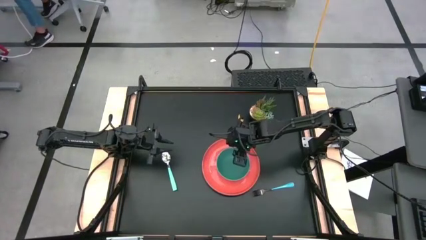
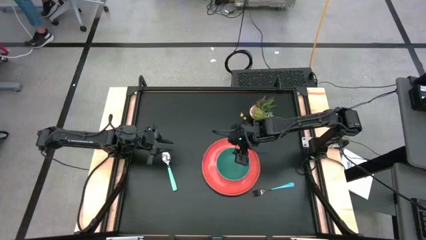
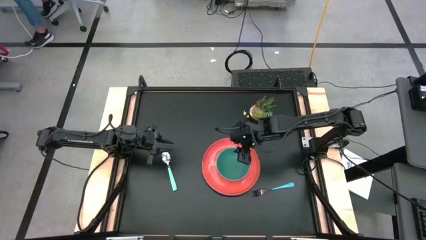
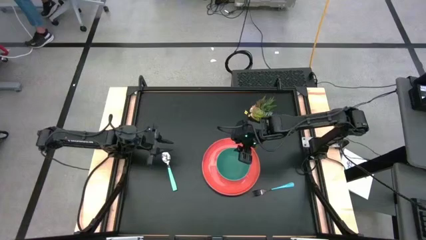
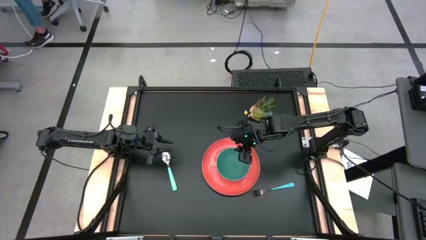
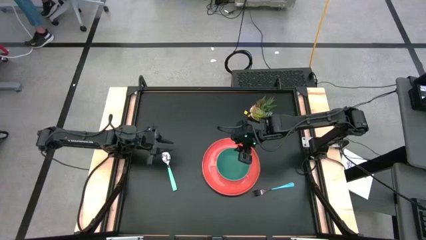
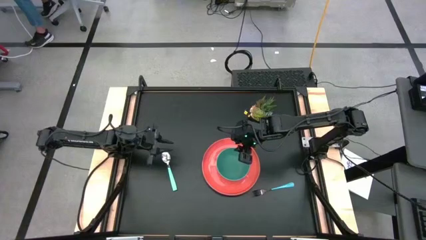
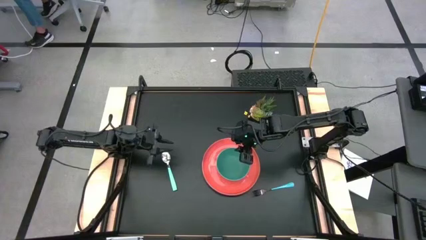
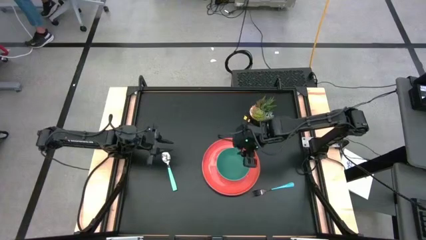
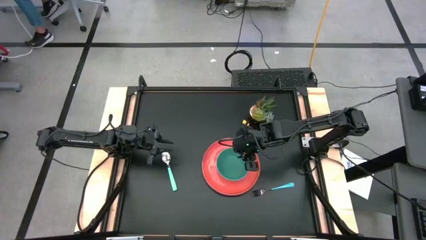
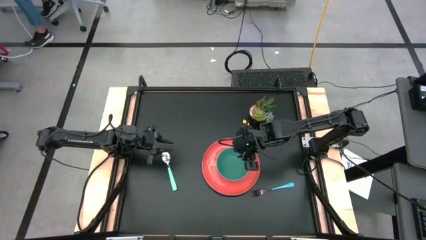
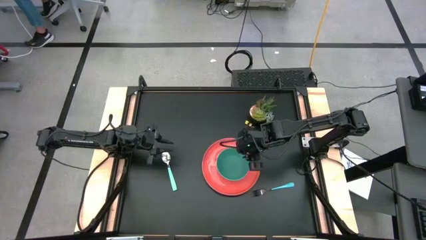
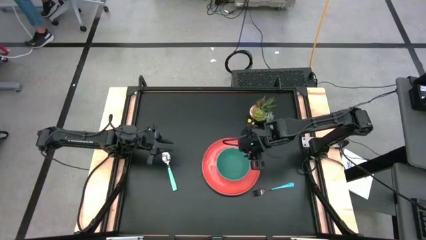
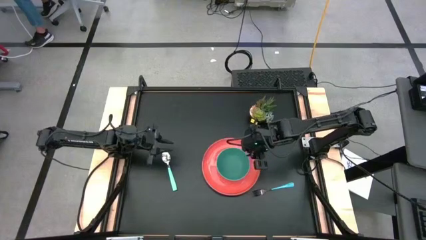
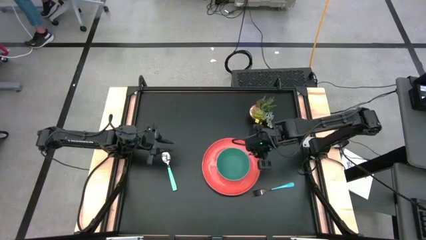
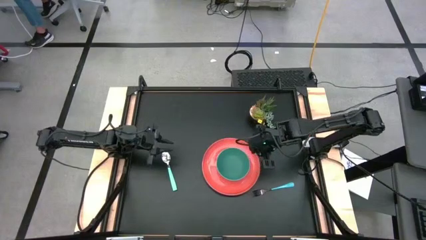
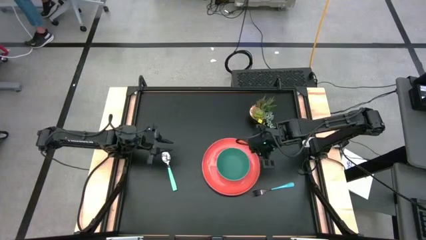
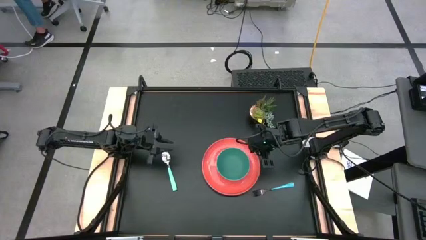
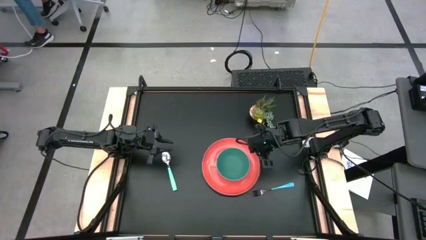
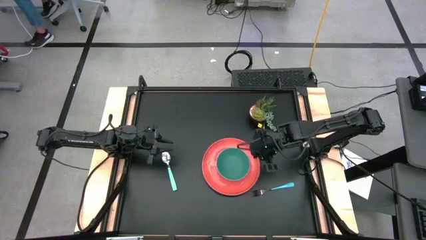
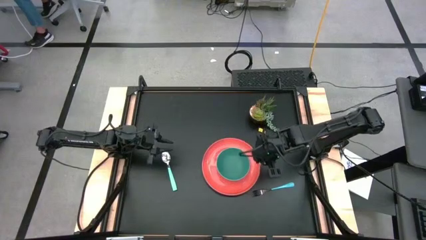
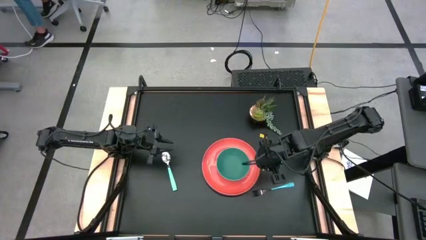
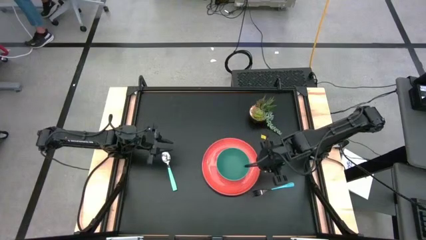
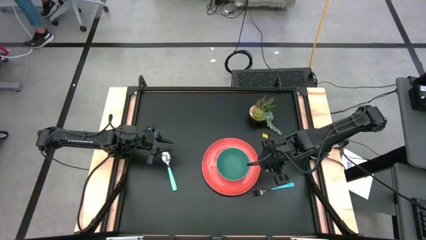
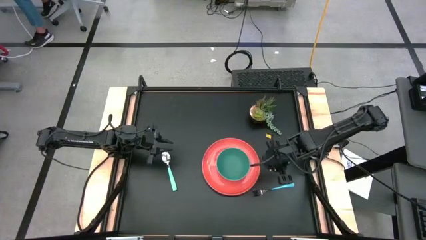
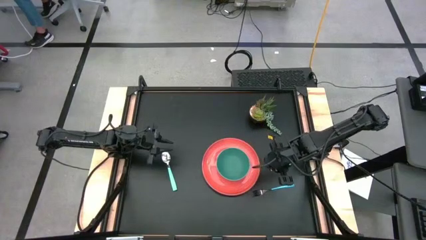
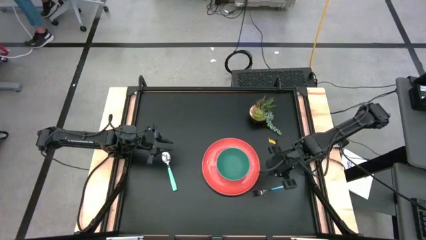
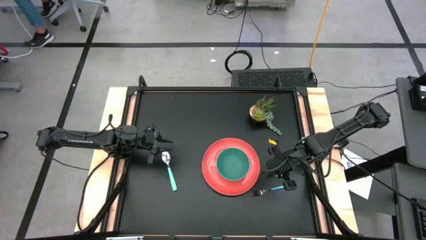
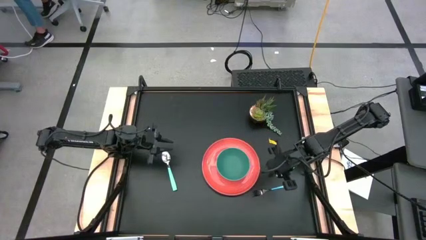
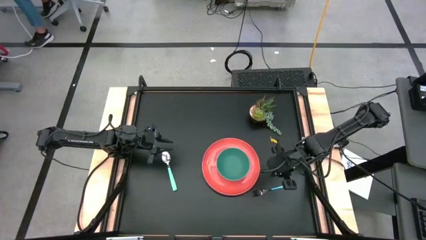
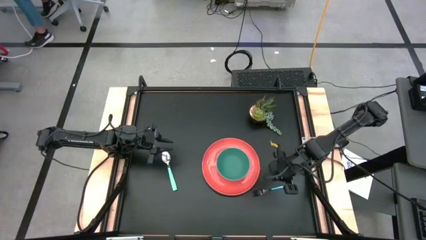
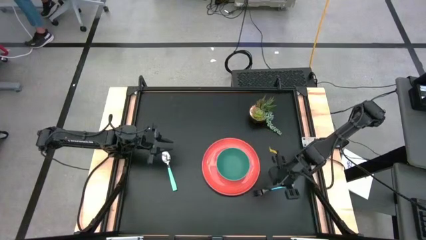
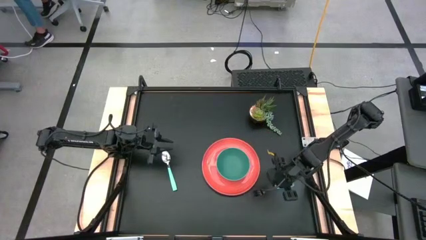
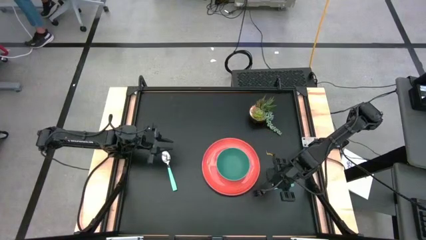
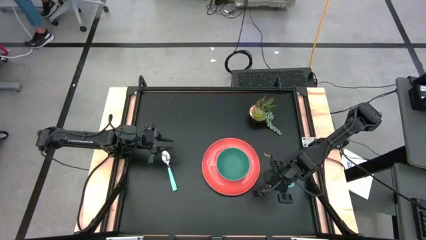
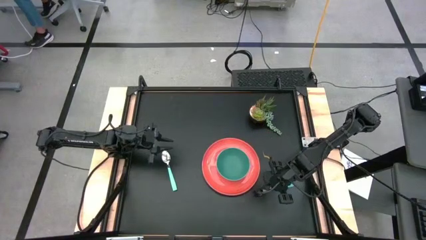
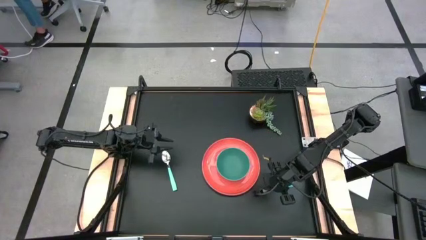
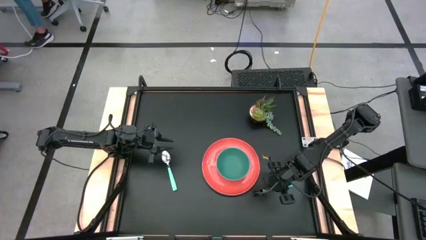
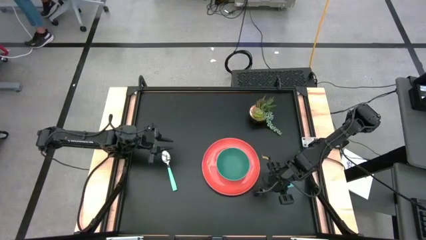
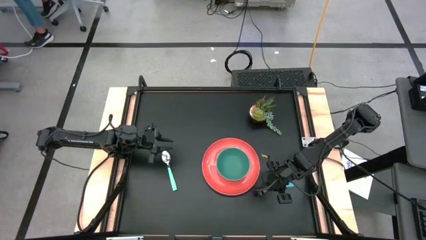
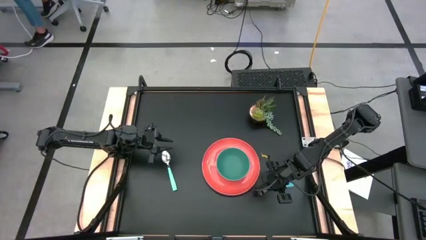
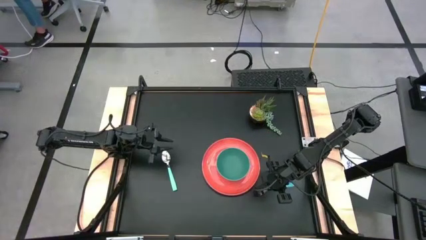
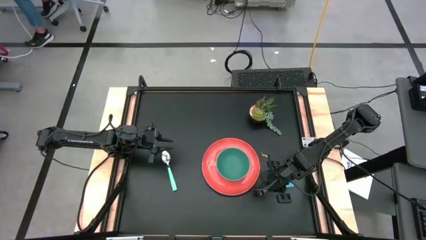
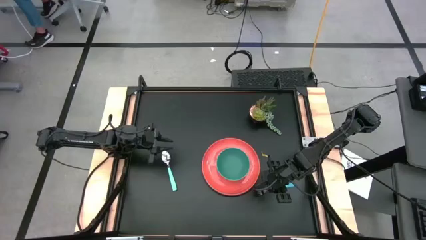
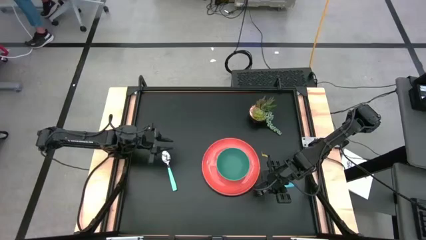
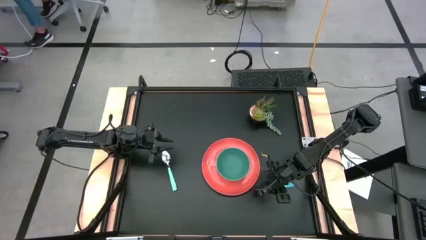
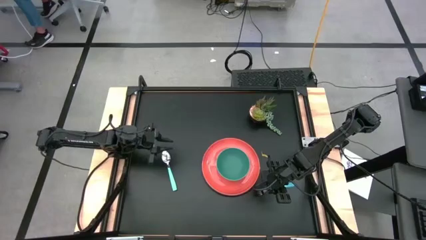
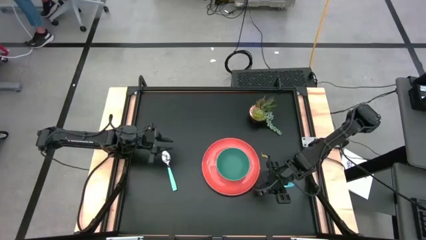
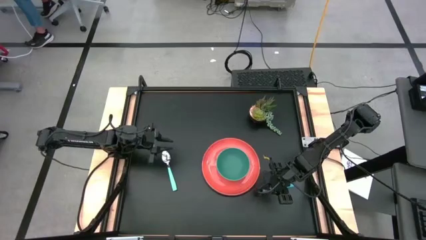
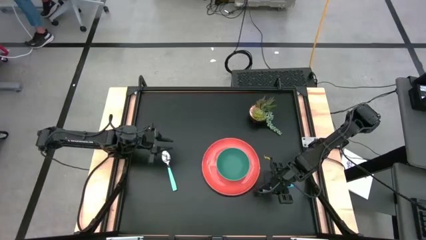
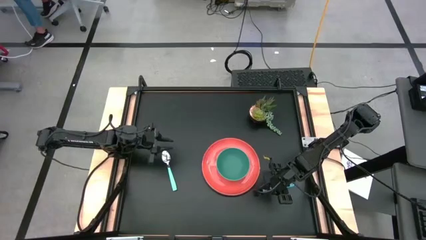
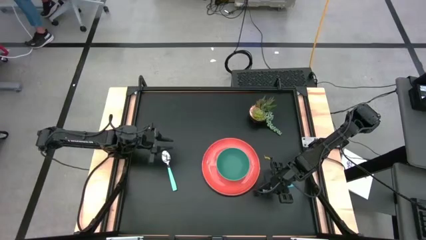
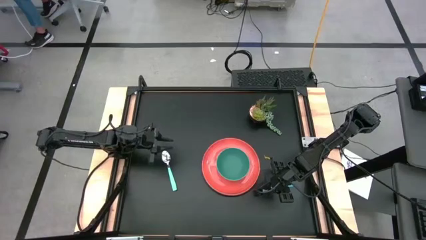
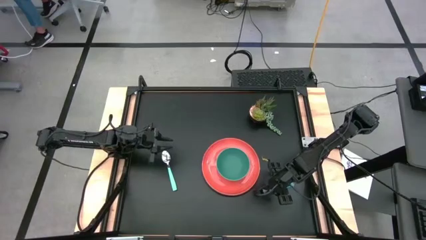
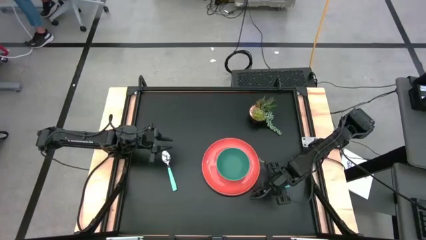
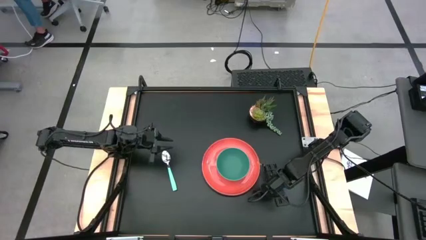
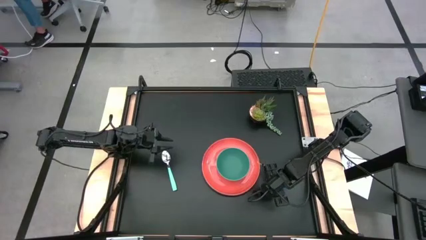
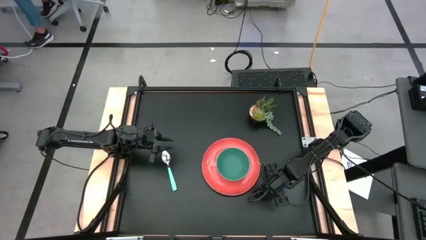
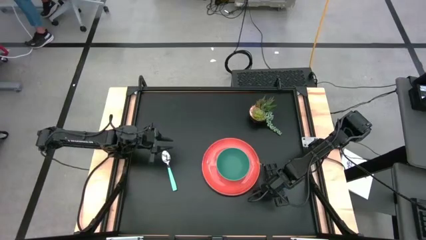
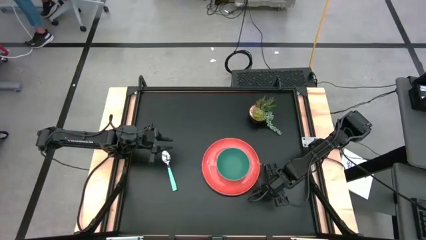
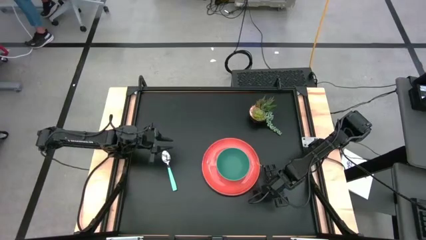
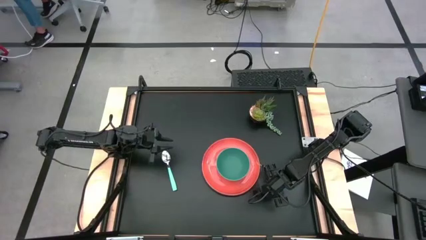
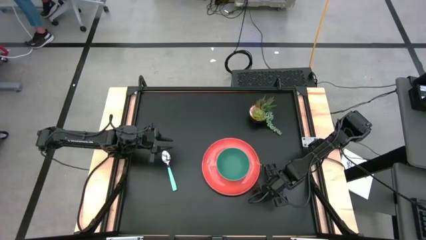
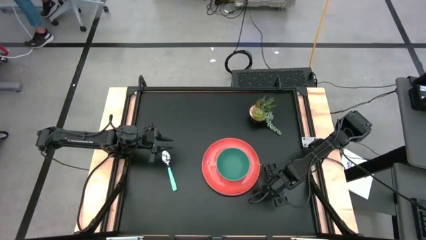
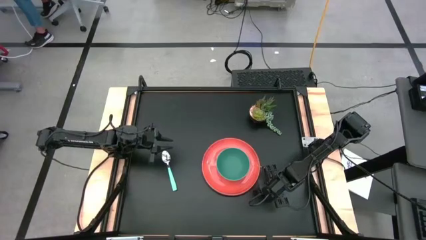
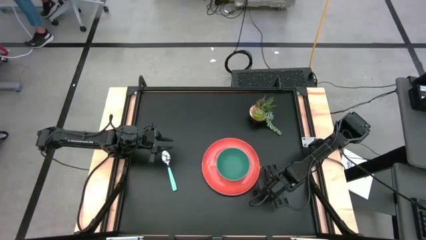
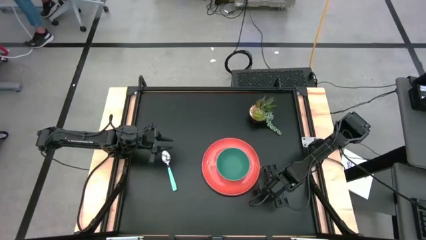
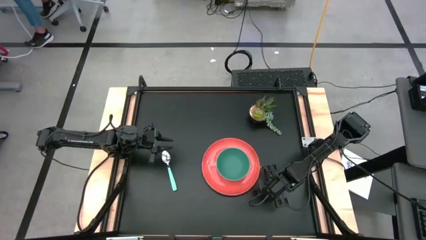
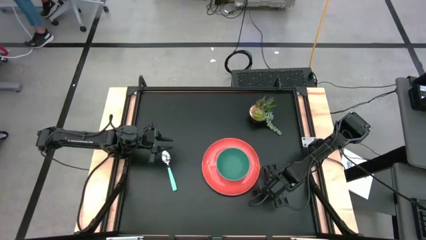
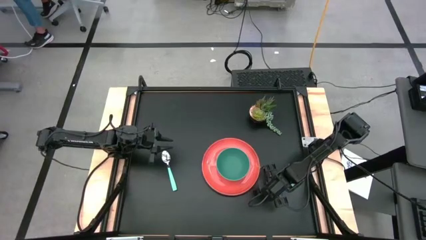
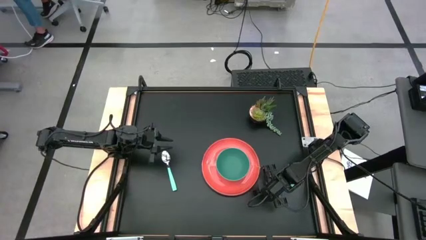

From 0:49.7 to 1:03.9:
Task: Set table place
Put the blue fork on the orange plate to the right of the green bowl

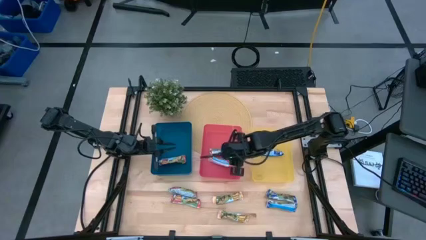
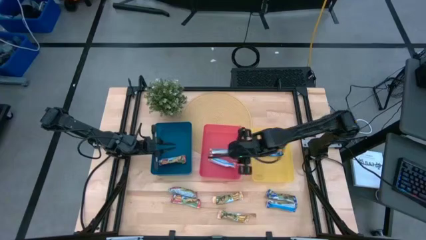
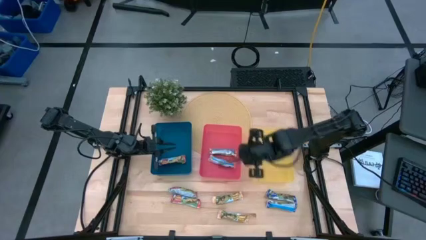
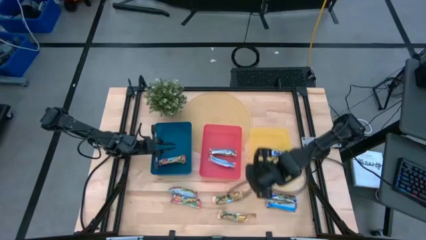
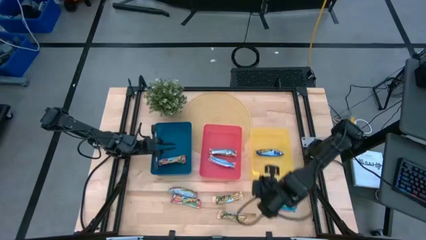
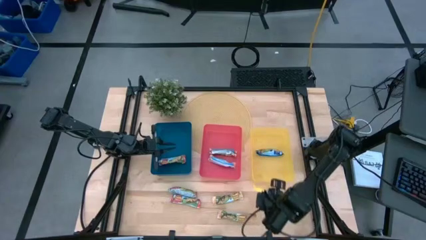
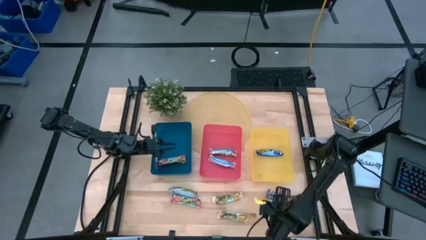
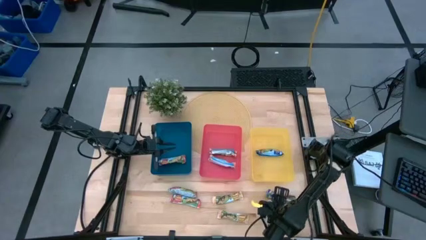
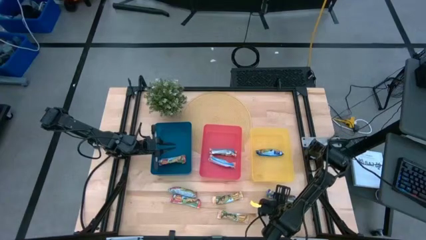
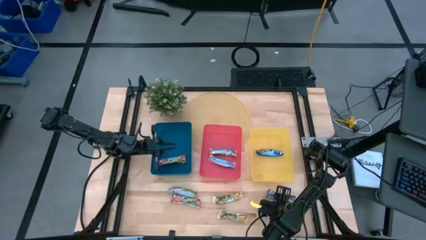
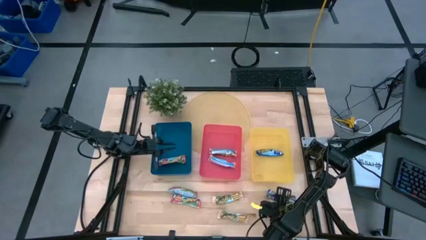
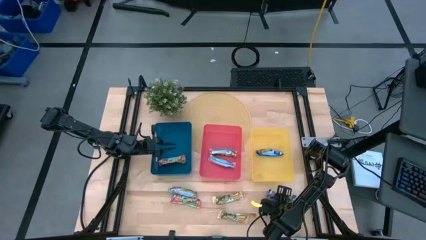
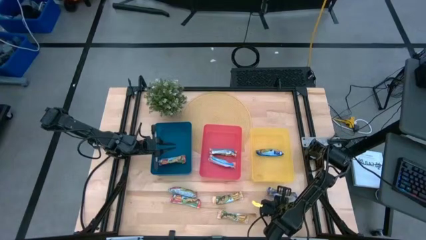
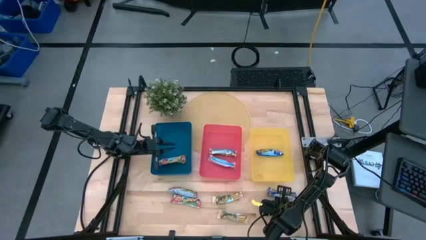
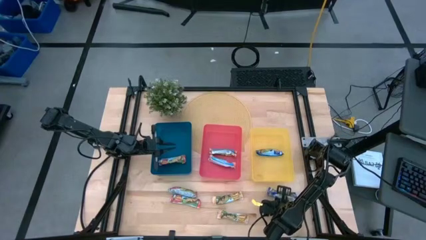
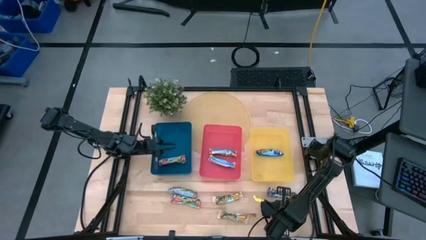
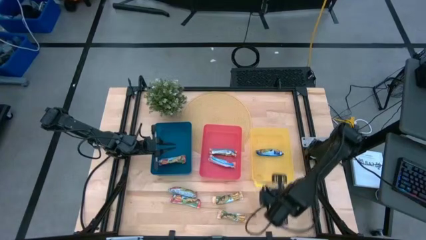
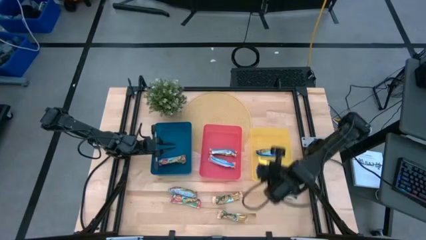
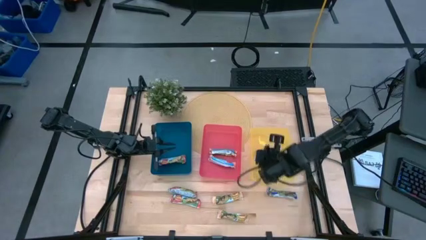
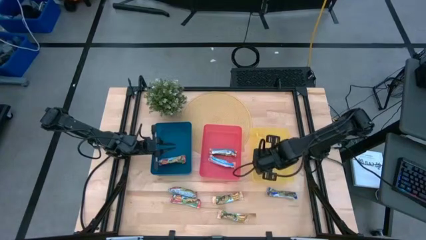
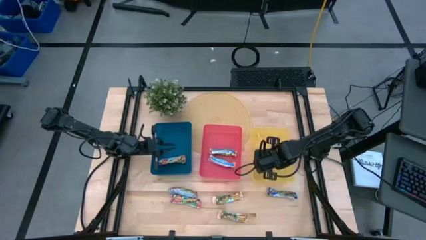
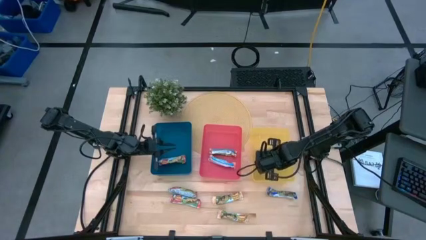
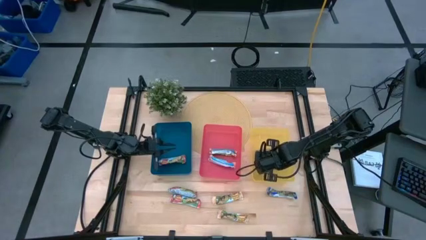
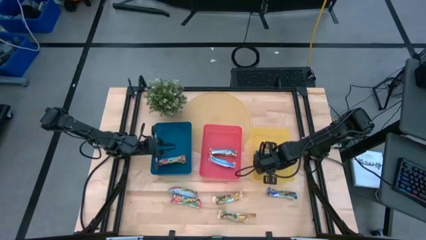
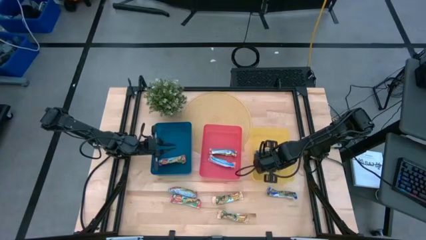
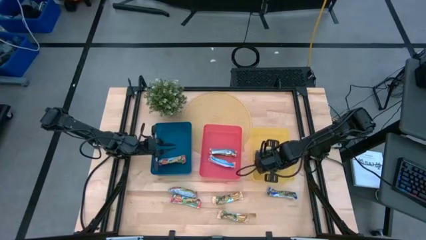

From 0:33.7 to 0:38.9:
Task: Pick and place Granola Bars by type
Put the blue granola bar into the yellow bin
